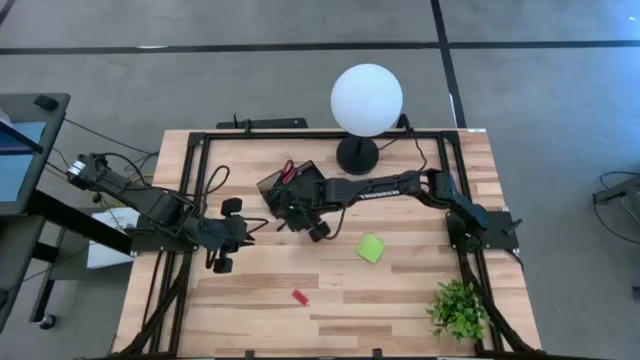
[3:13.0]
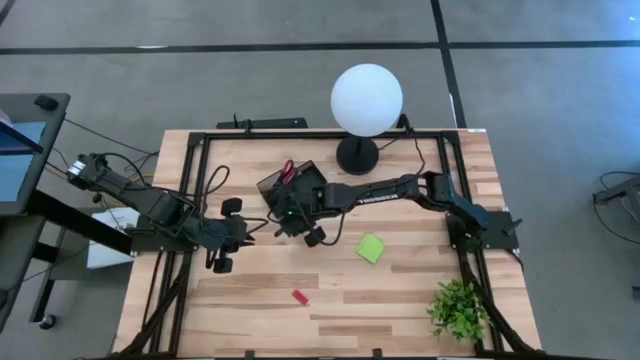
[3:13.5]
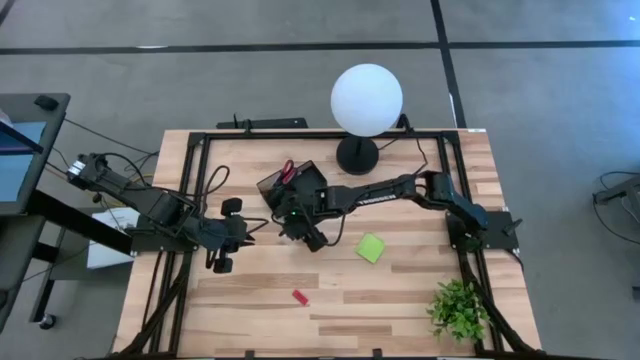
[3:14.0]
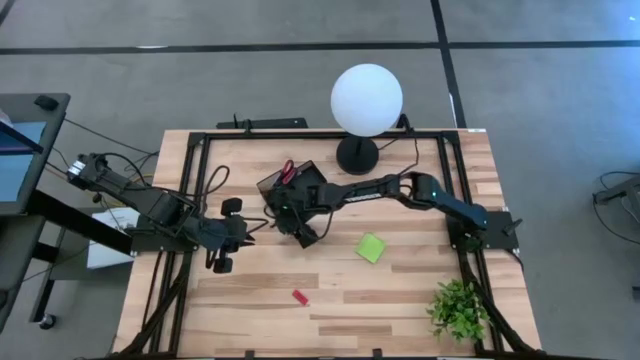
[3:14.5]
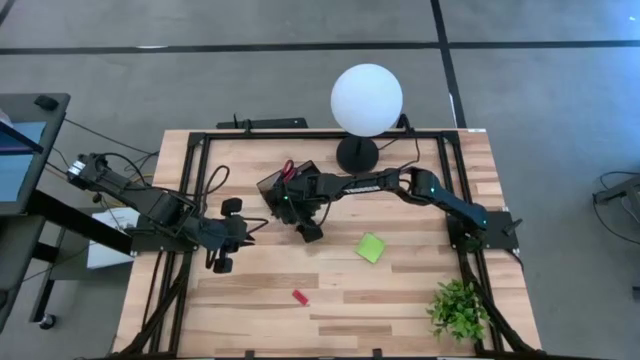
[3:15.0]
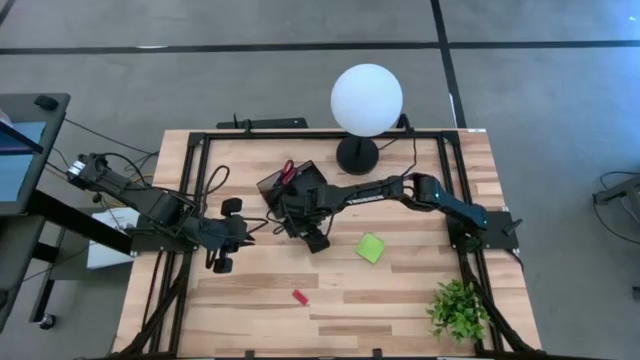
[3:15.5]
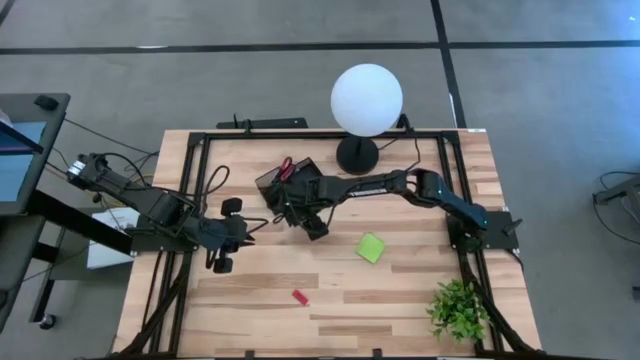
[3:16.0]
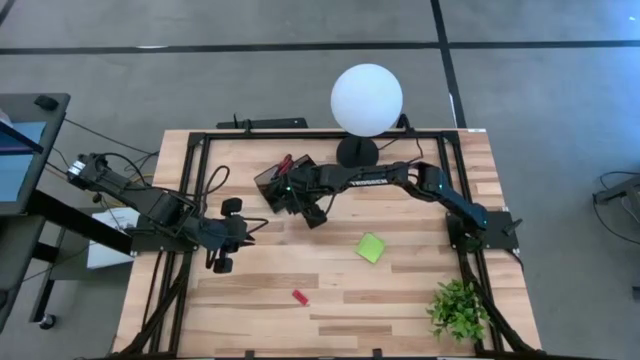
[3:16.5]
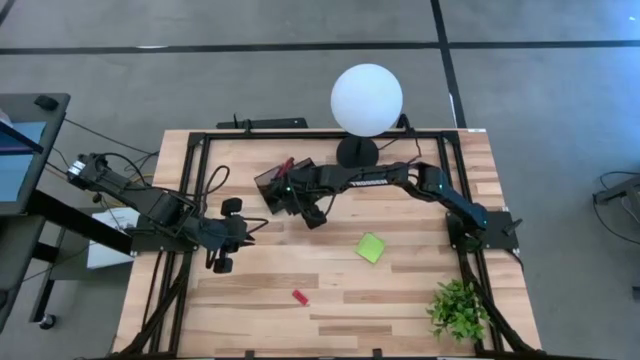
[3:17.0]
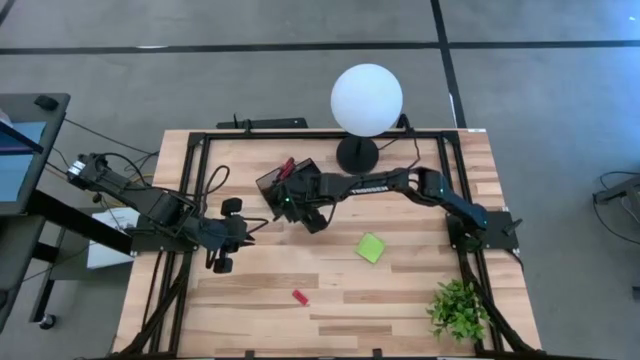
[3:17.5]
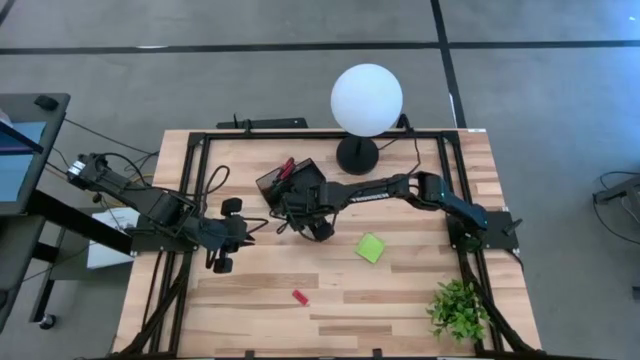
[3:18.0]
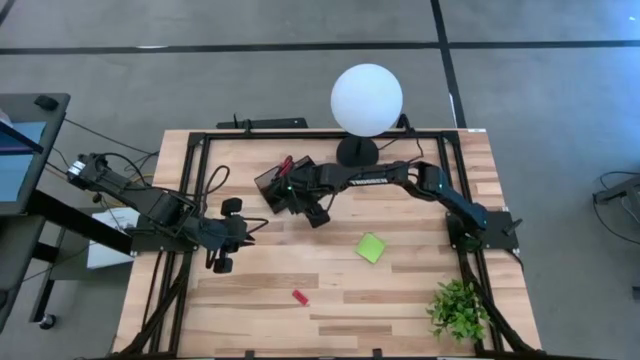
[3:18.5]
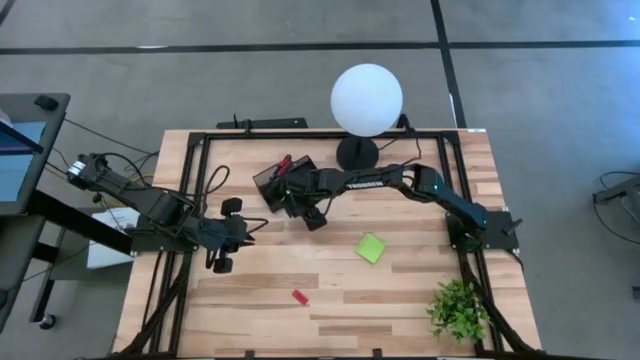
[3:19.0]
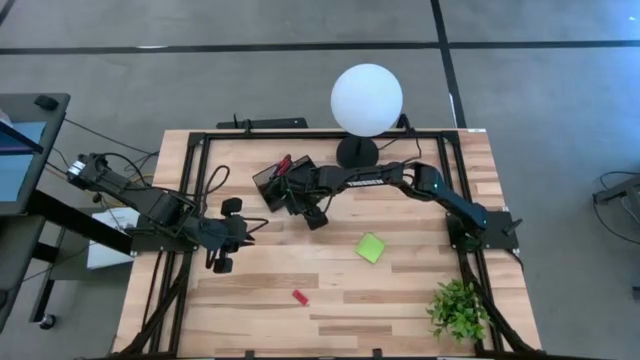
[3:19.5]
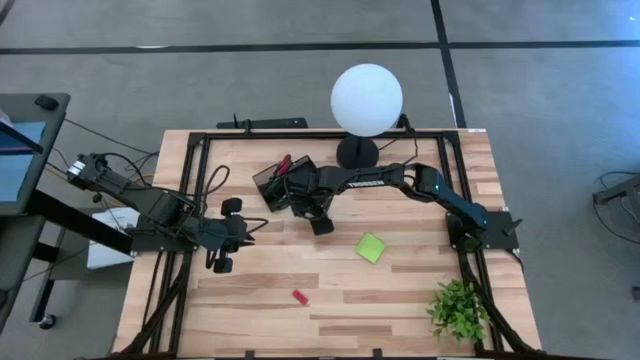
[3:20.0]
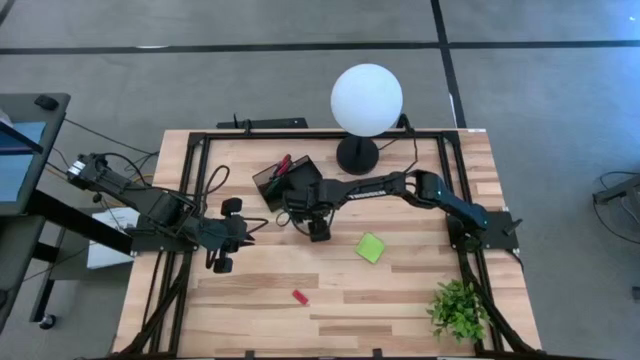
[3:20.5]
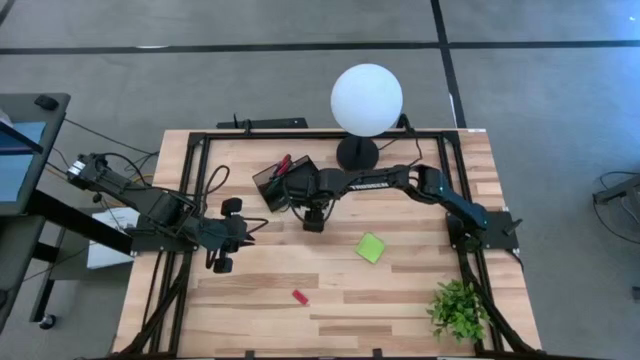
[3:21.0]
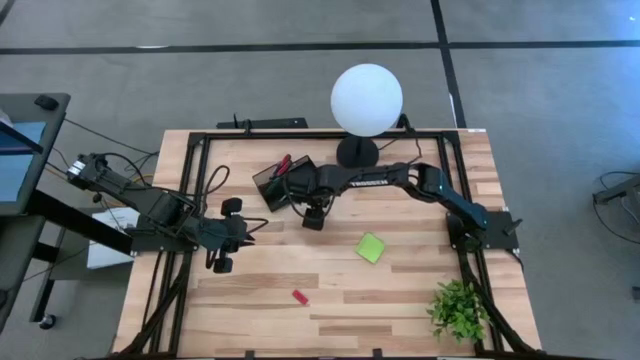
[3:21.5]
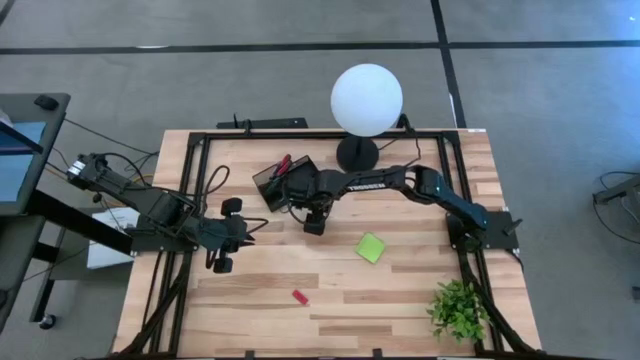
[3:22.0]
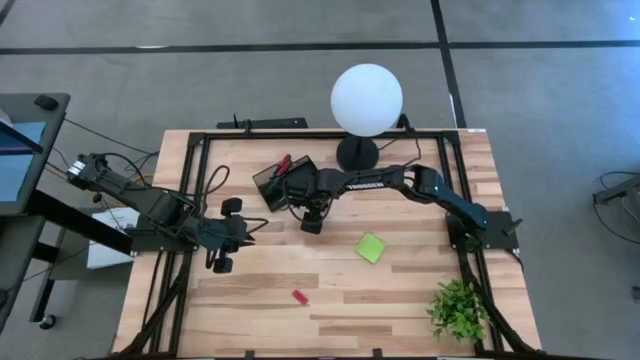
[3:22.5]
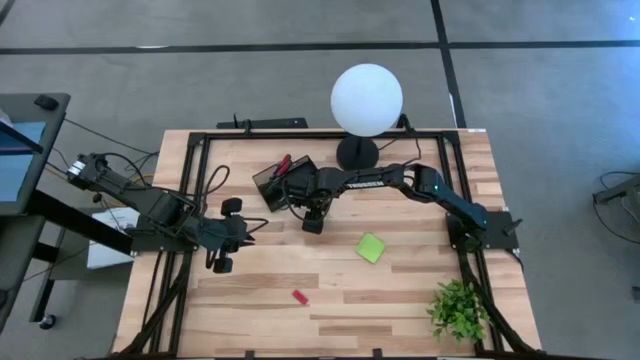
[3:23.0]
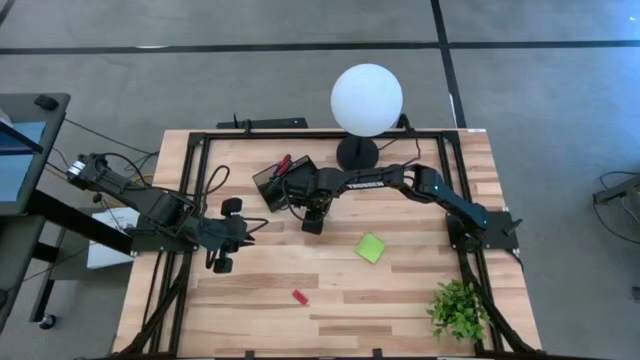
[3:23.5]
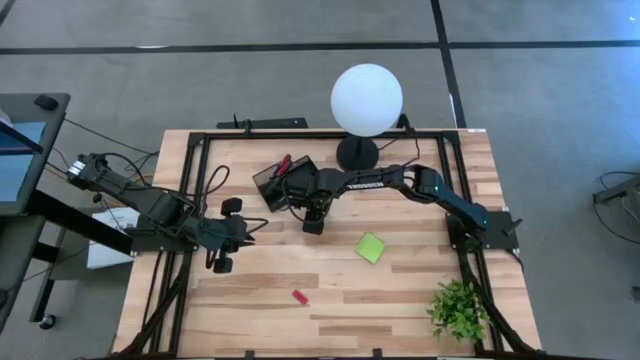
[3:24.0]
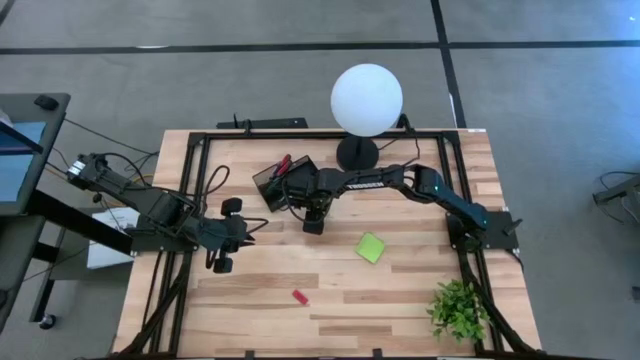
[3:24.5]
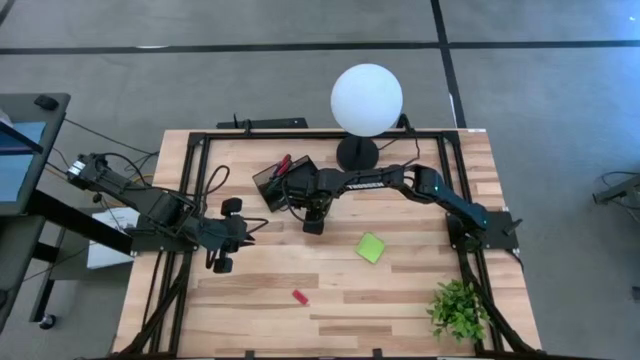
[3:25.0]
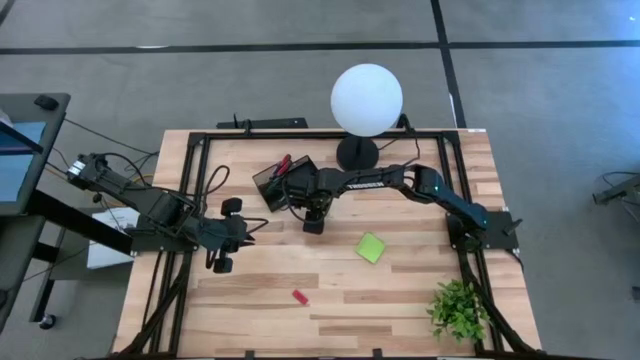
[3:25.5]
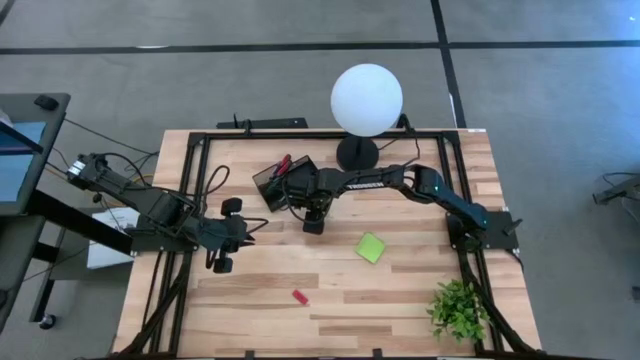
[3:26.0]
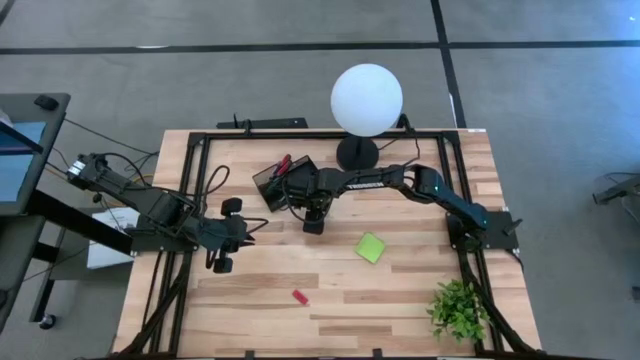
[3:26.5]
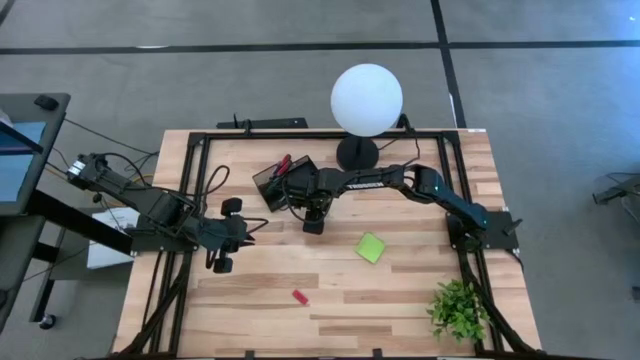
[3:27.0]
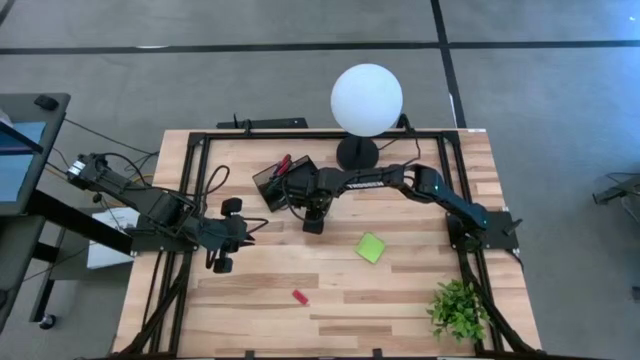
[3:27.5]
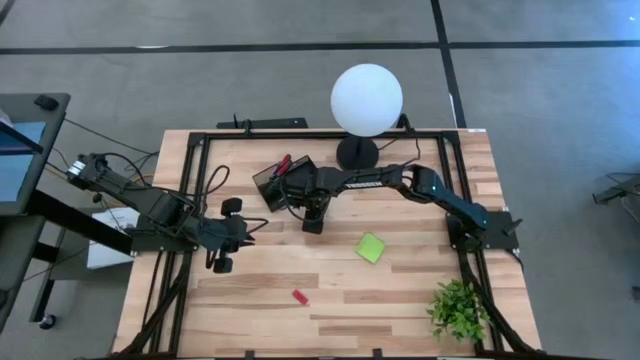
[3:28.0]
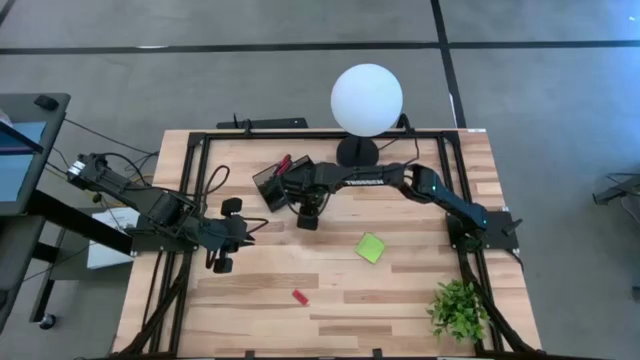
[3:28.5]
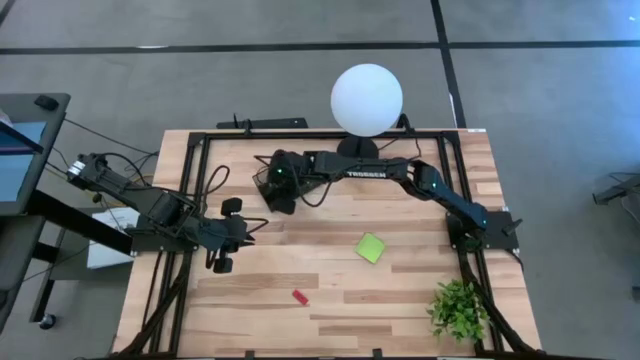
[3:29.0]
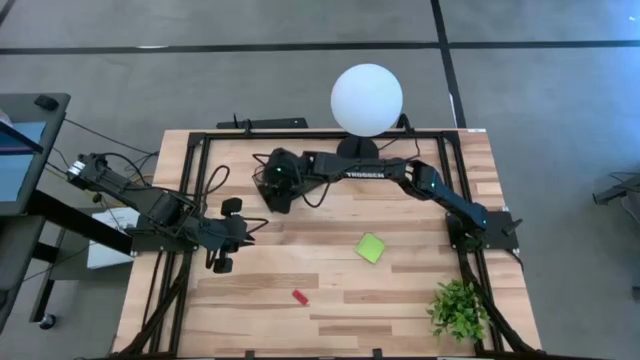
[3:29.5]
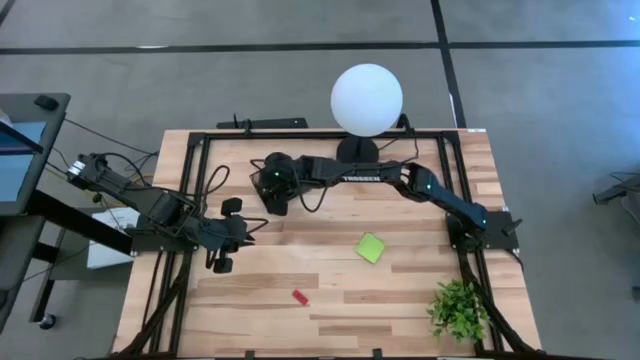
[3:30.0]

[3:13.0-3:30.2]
Task: Pick and place office supplies into organizer
Put the black binder clip into the black desk organizer

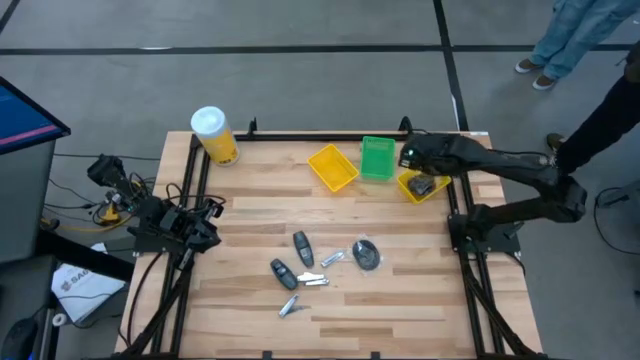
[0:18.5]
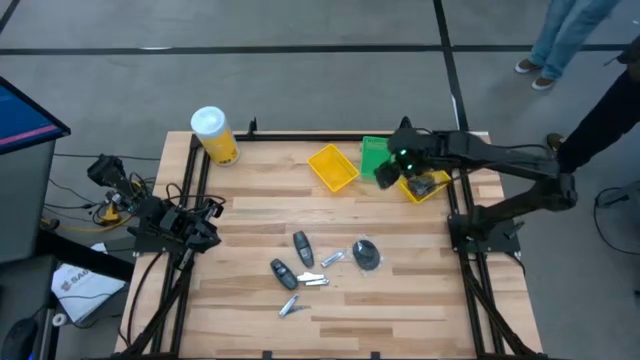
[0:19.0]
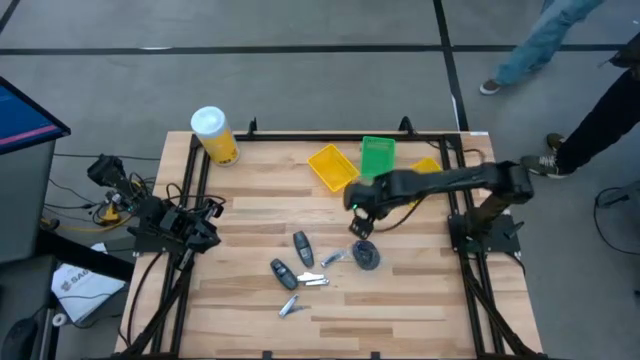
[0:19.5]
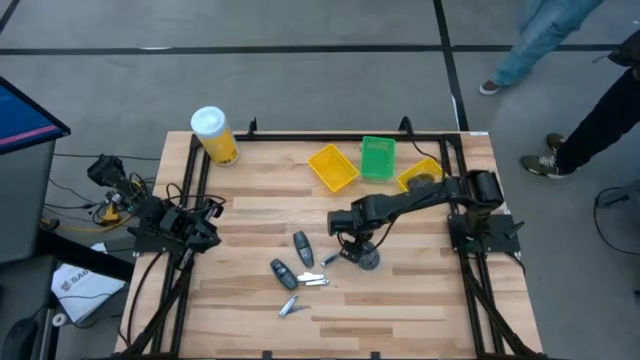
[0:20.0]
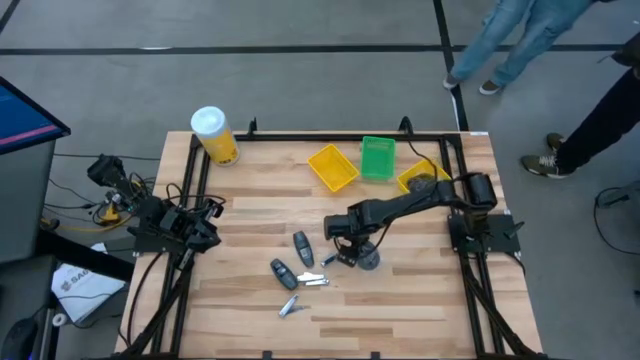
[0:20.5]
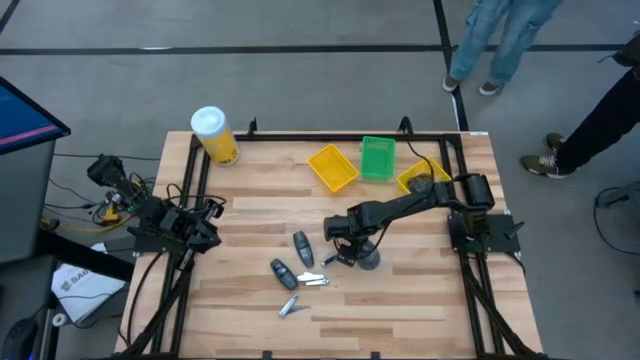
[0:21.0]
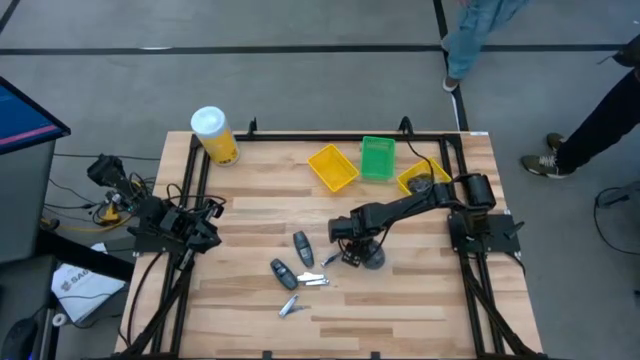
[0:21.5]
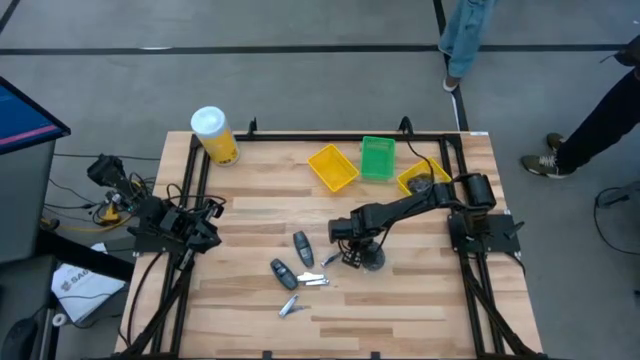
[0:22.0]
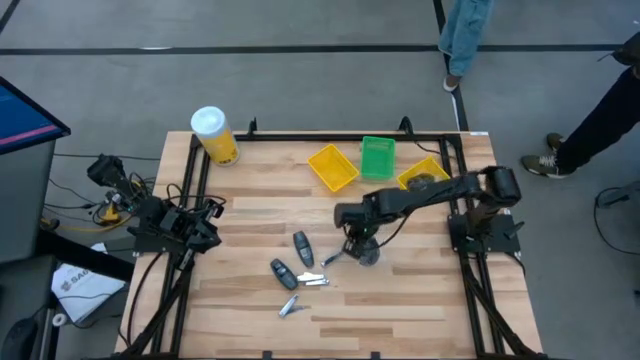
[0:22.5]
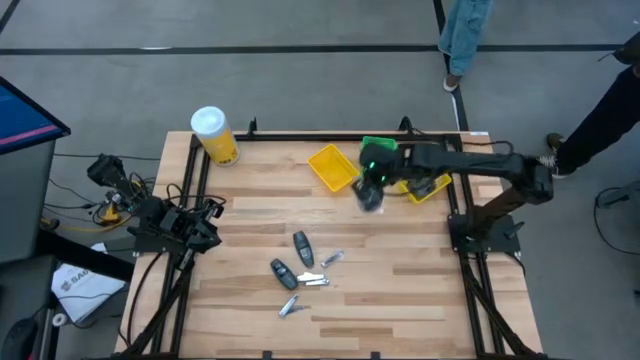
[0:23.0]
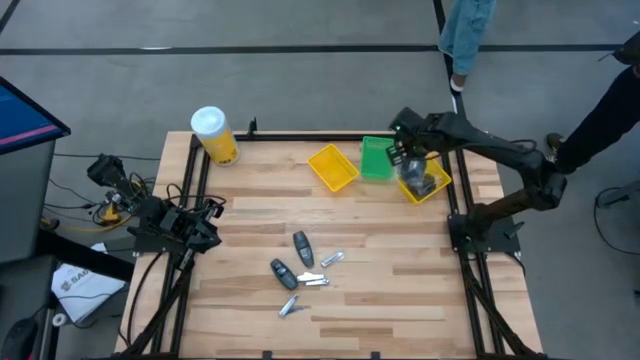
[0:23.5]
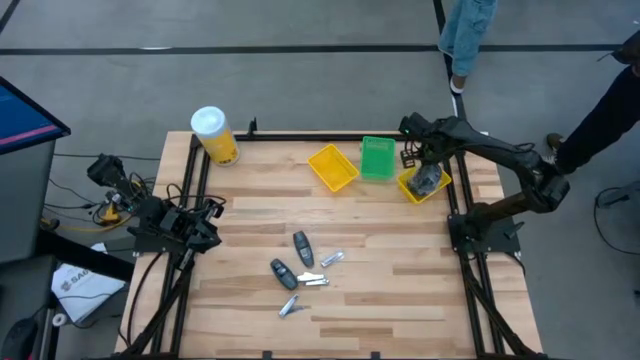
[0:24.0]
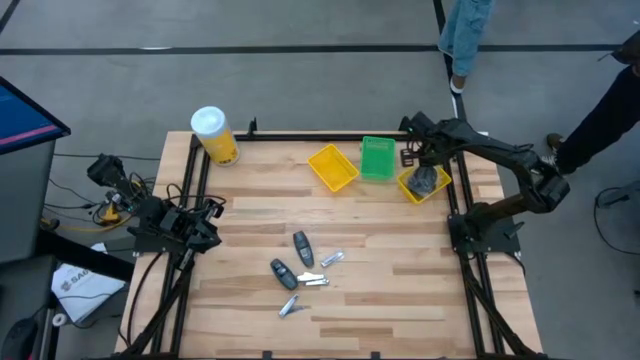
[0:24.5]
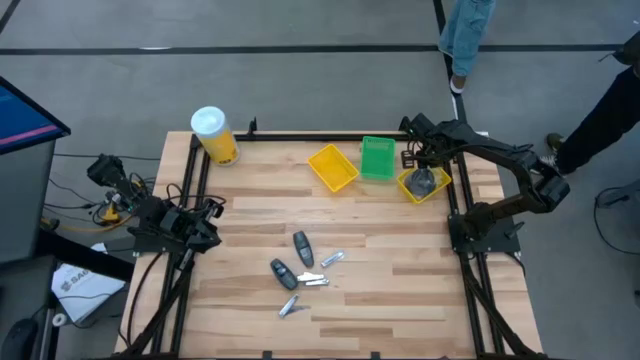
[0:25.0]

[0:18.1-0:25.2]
Task: Pick & Place Travel size toiletries
Put the black hairbrush into the right yellow basket
